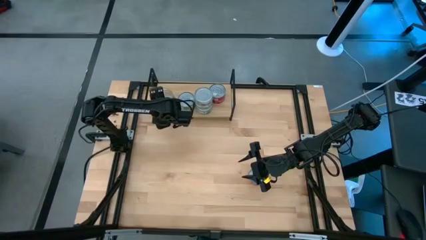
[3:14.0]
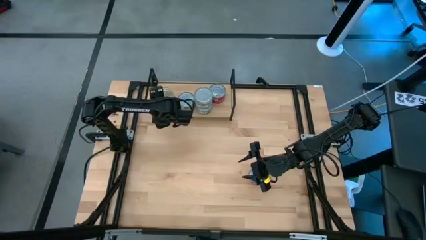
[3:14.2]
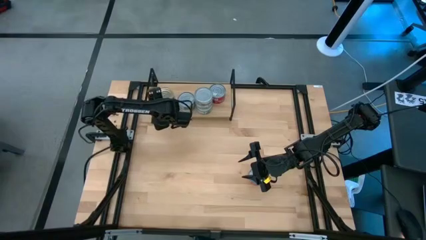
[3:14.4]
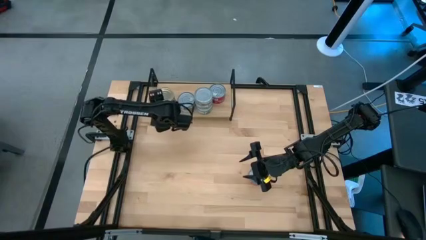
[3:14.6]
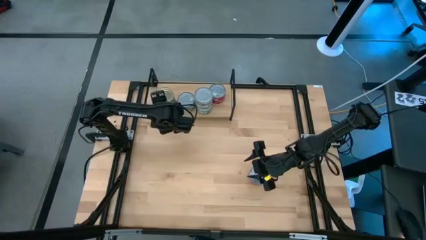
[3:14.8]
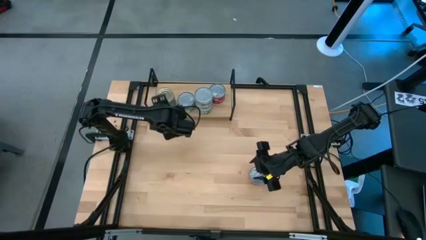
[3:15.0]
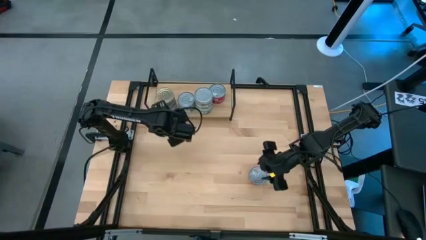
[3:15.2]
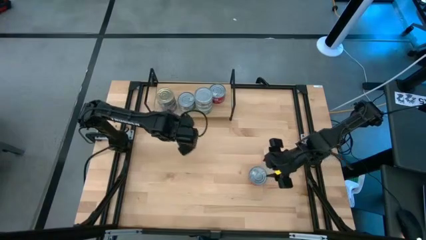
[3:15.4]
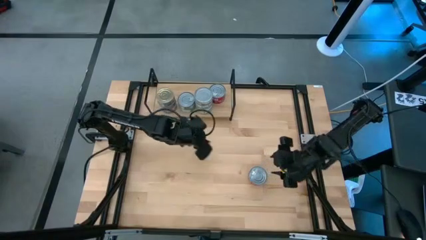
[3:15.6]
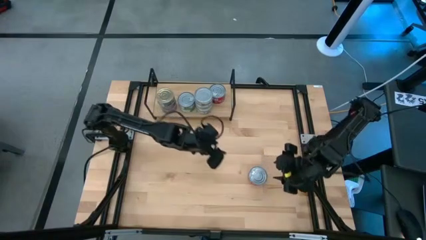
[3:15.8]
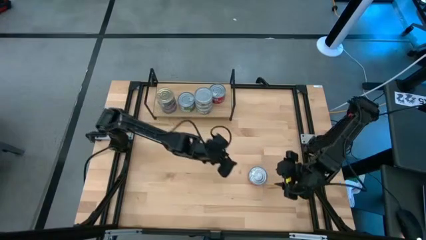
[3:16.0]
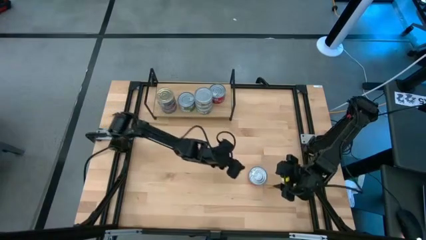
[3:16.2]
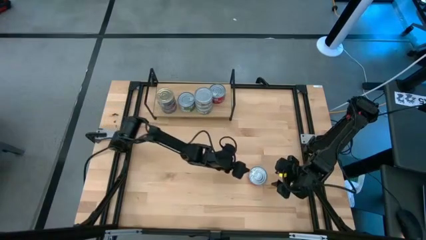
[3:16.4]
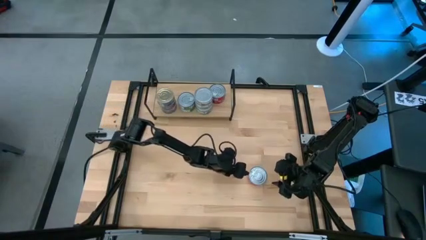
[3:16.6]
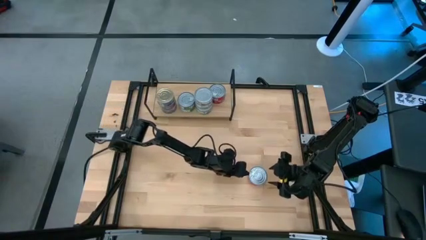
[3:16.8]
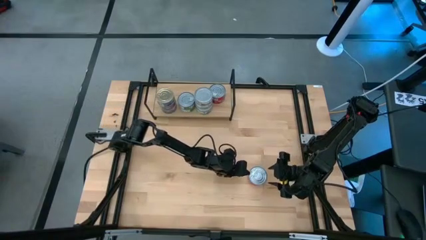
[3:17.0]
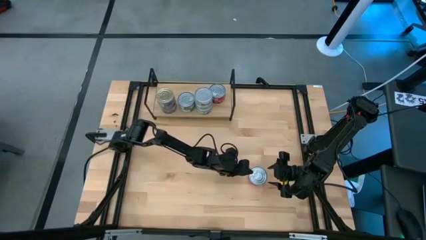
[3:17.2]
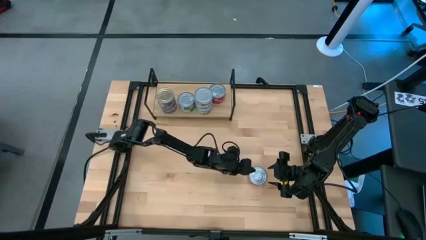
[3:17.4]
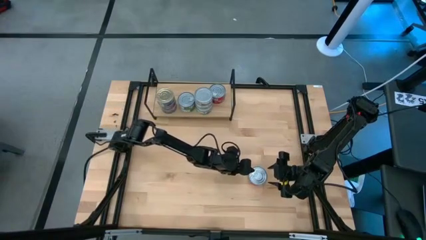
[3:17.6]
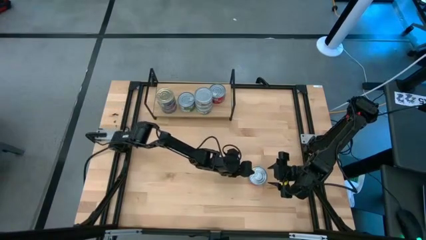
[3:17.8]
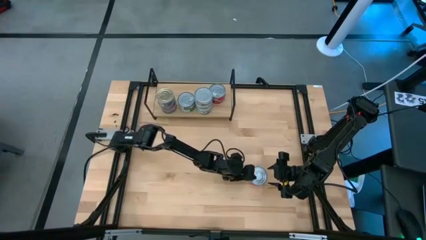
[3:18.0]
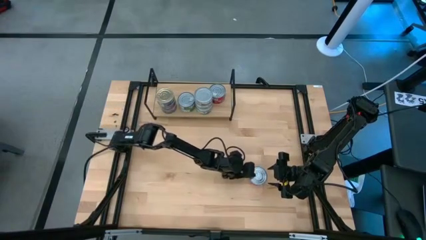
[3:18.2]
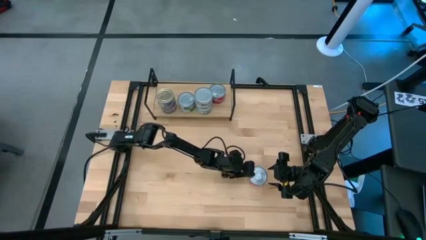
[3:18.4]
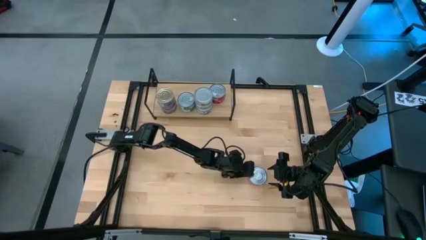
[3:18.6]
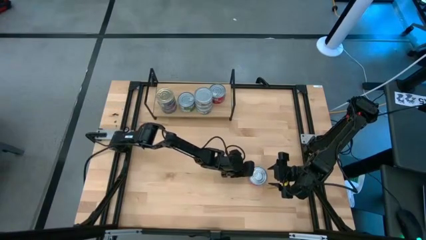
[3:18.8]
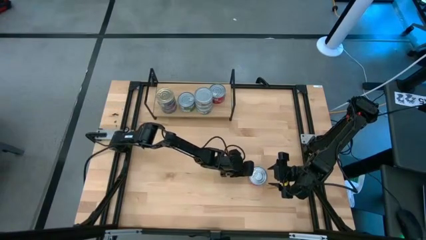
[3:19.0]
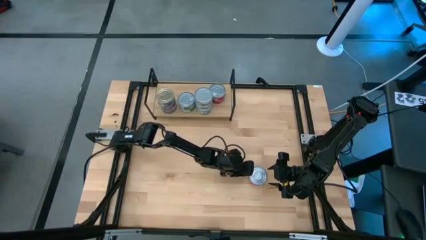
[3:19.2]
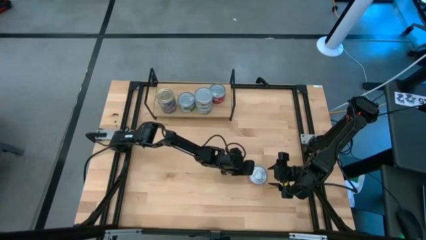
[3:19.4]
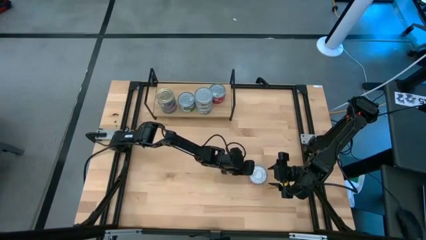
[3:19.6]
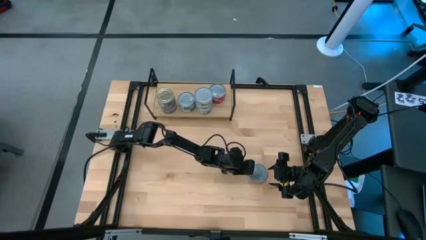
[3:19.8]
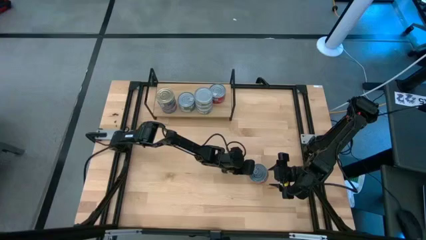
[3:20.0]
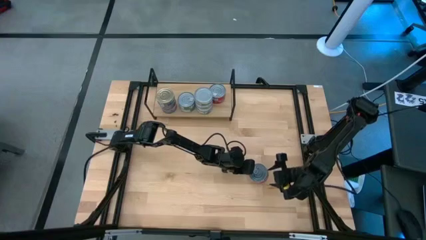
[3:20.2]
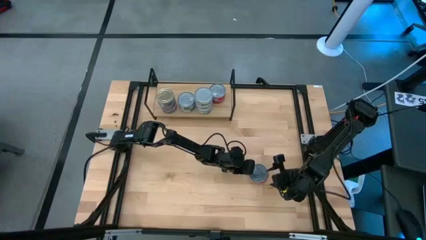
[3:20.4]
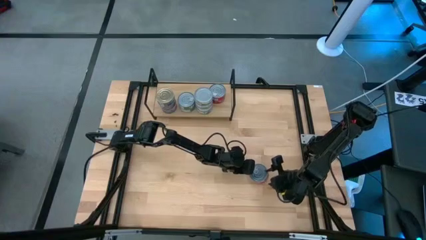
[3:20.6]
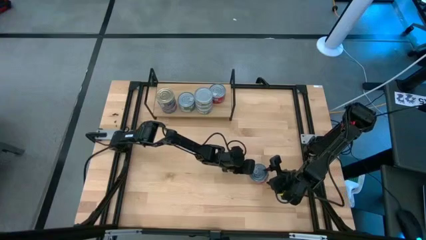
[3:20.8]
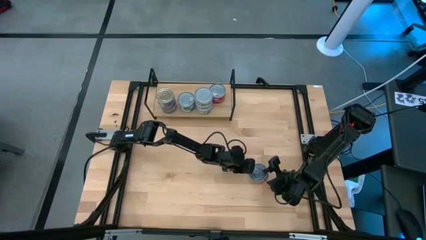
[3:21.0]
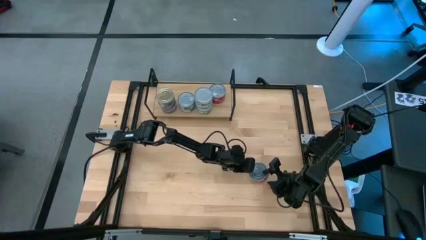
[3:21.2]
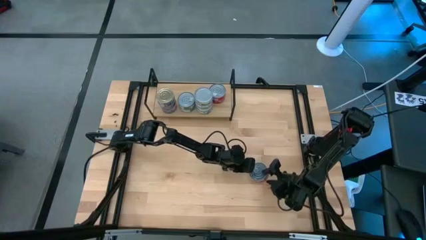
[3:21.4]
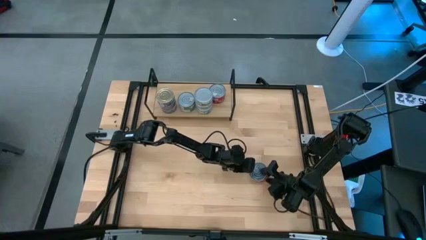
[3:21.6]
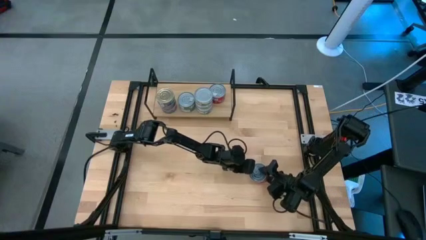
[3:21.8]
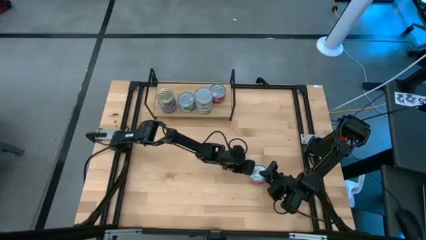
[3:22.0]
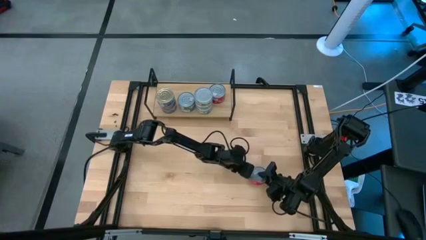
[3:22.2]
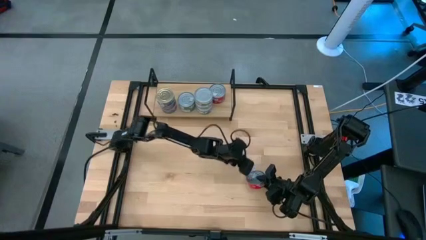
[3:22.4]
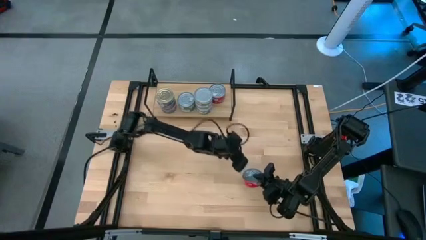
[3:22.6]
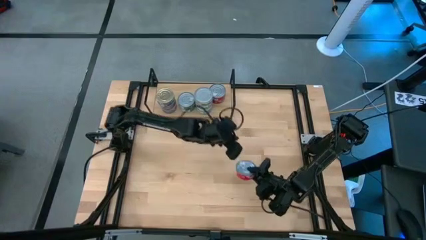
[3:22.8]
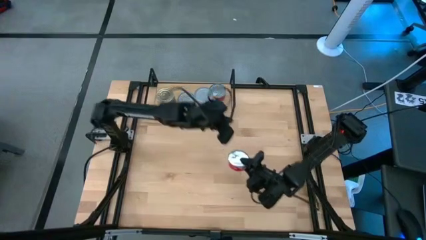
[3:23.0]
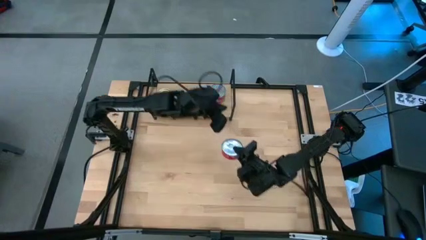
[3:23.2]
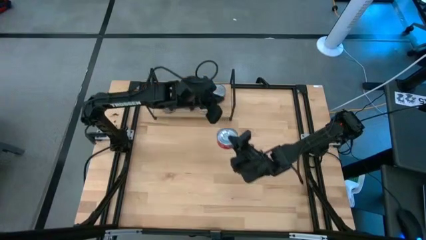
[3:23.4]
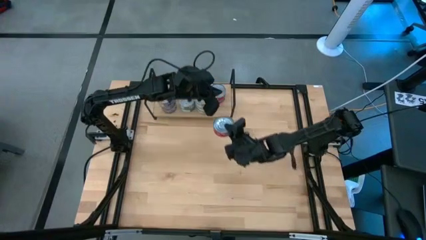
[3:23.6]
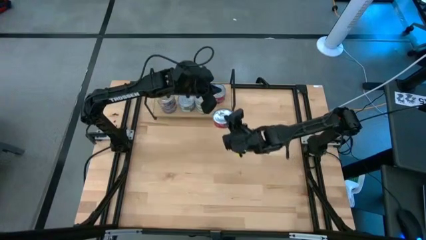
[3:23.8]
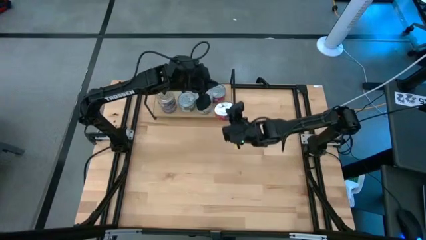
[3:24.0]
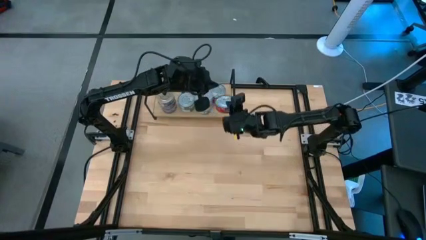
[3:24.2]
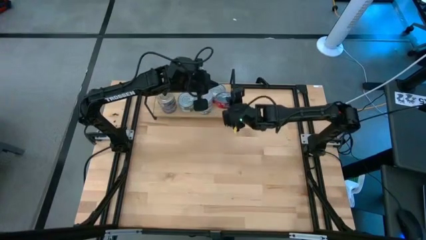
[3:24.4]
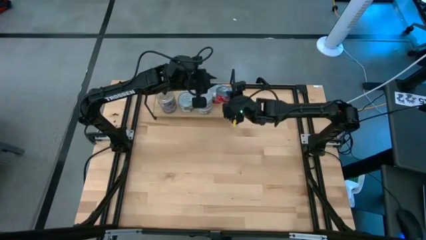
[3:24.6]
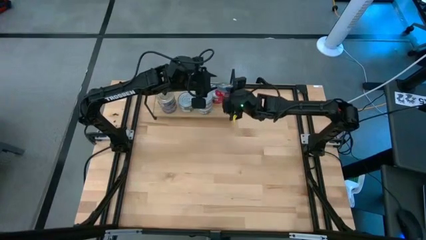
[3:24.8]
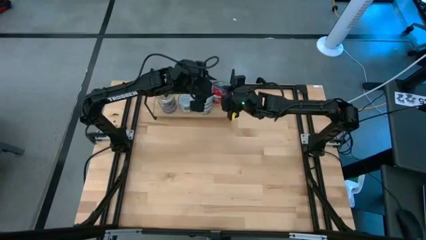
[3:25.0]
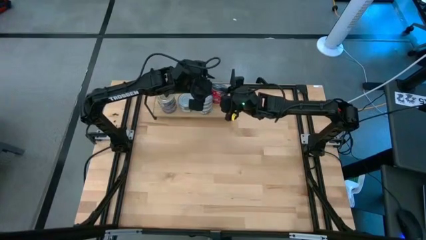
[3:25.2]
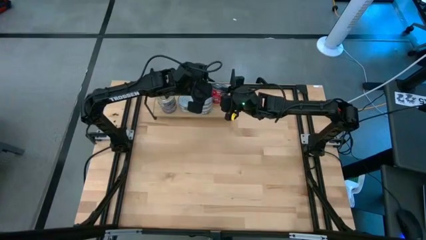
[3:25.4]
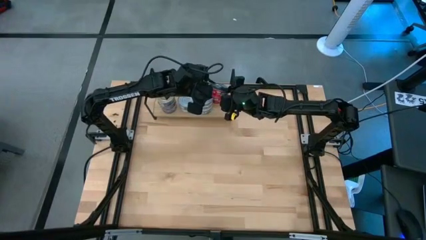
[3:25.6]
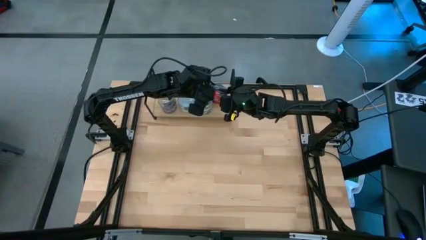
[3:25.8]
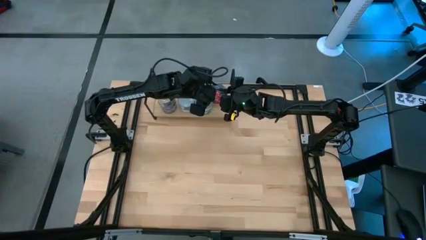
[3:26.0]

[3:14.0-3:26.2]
Task: Stack canned seafood by type on shelf
Stack the red tuna can on top of the other red tuna can on the shelf

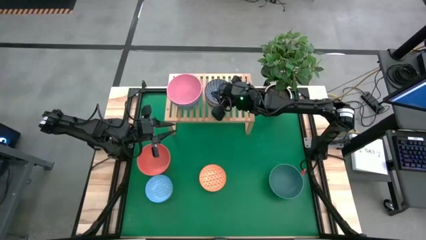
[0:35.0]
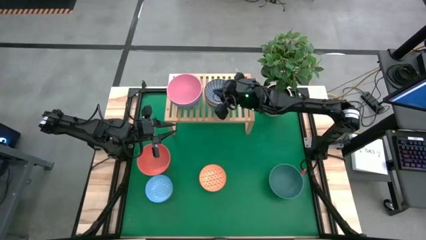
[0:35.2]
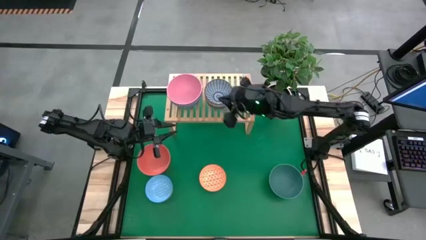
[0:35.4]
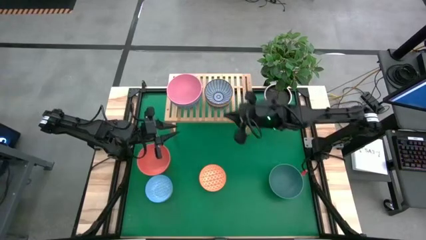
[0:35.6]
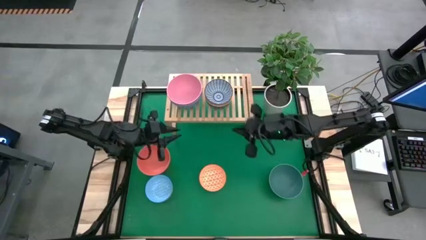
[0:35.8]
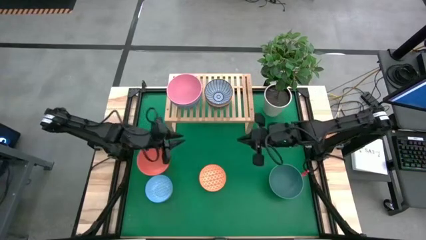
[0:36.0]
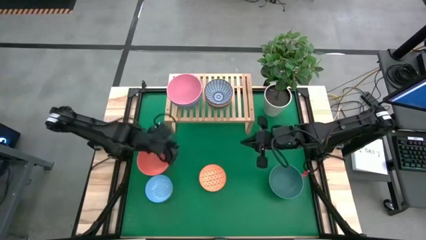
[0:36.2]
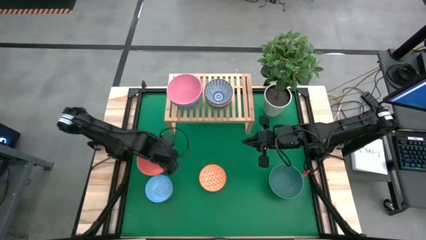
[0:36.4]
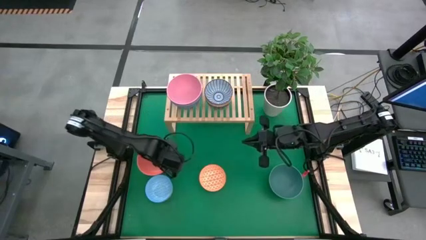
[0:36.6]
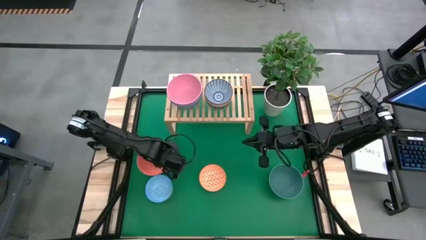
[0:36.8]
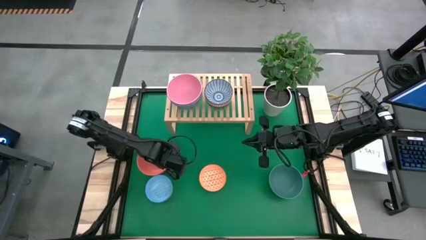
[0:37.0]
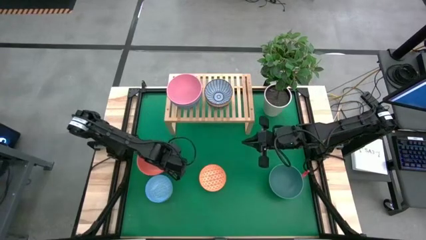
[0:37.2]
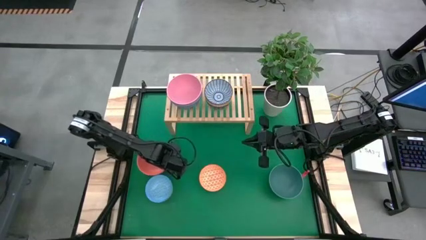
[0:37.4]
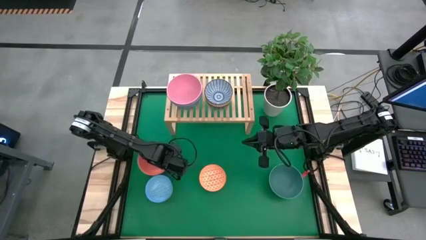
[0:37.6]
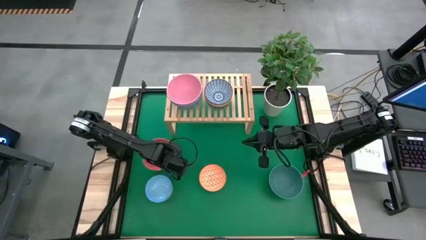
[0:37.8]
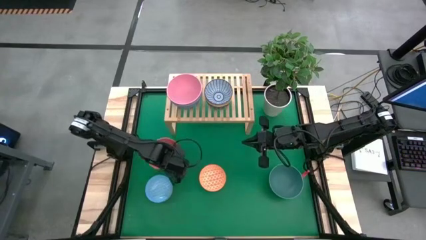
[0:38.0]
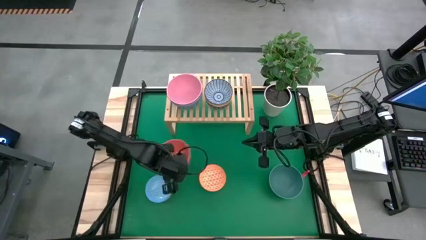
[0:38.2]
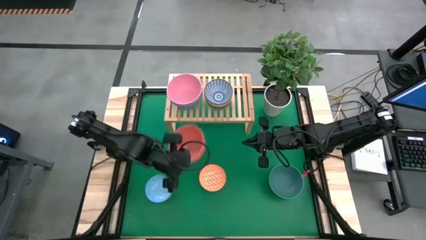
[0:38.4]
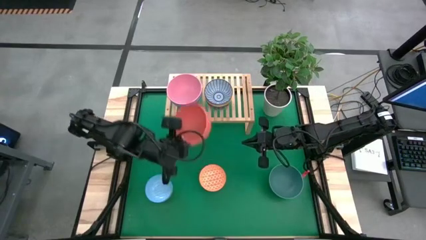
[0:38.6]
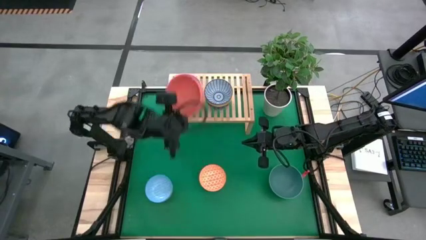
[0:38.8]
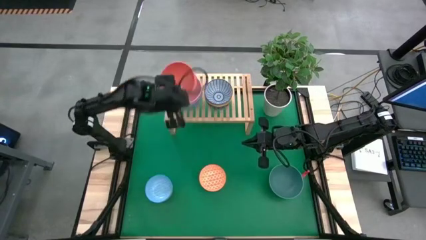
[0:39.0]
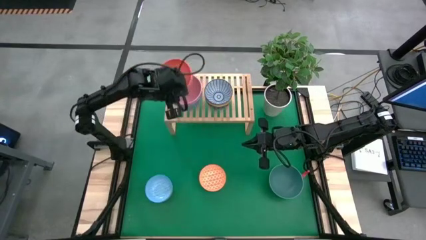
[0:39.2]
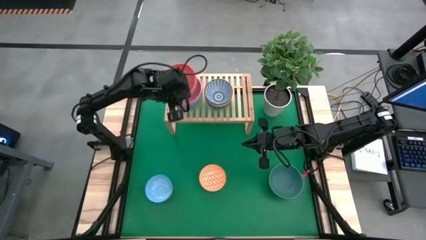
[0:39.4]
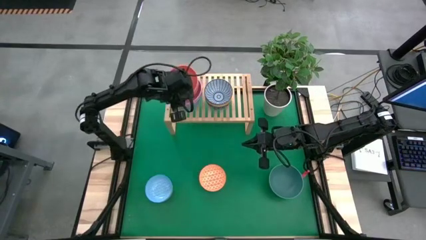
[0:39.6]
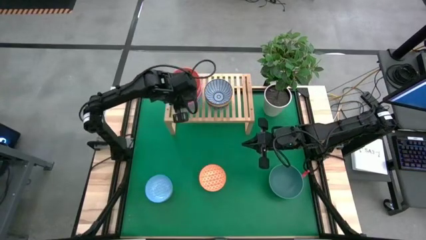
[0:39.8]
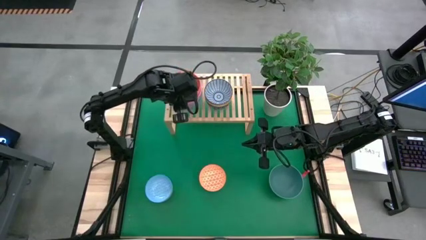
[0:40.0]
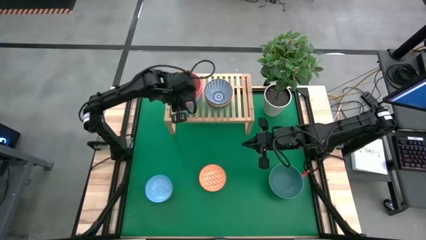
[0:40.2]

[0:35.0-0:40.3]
Task: Place and stack bowls onto a shelf
Stack the orange bowl onto top of the pink bowl on the shelf
